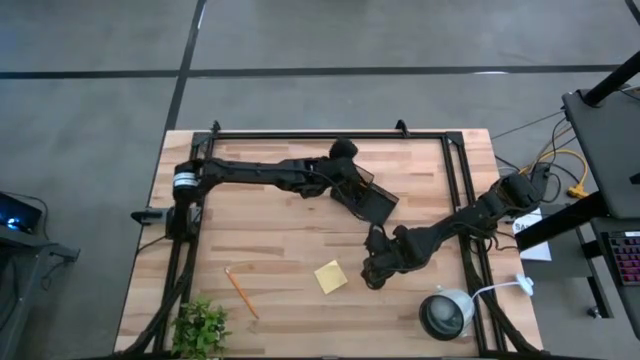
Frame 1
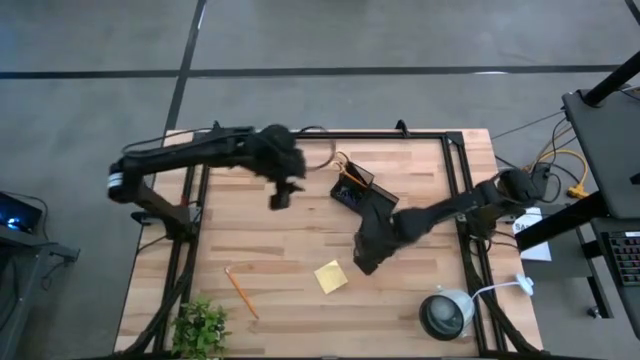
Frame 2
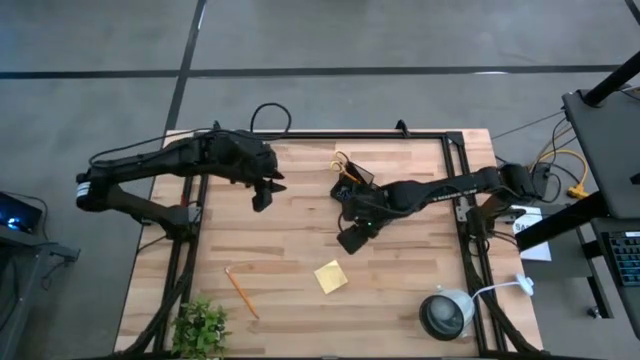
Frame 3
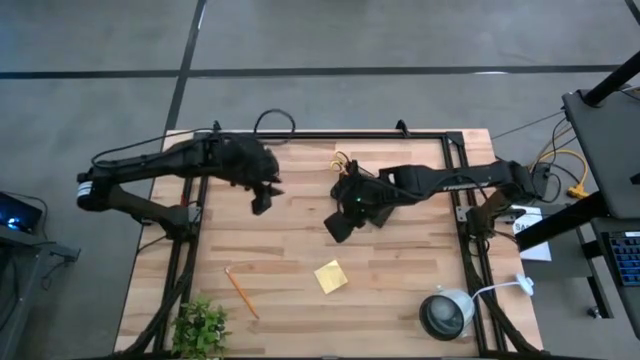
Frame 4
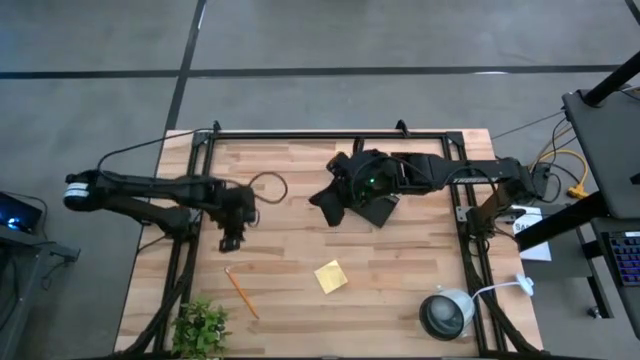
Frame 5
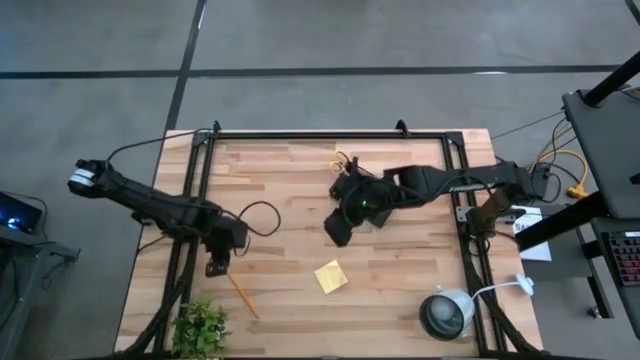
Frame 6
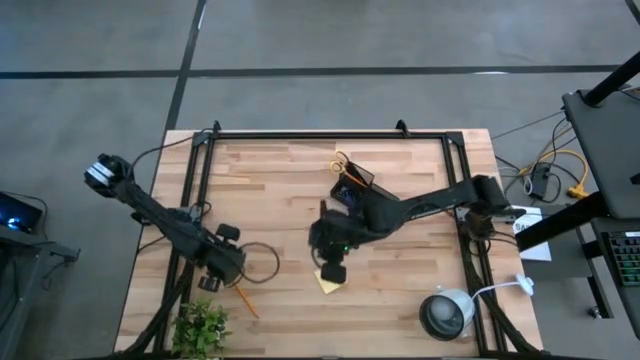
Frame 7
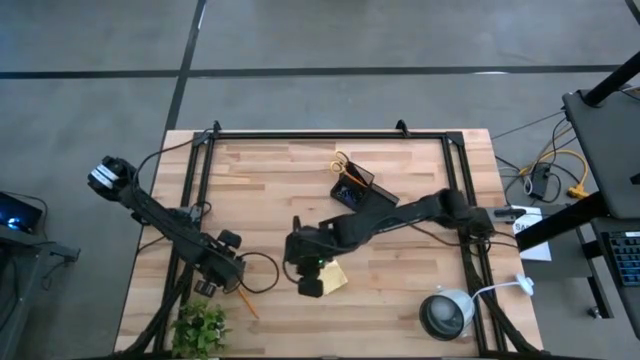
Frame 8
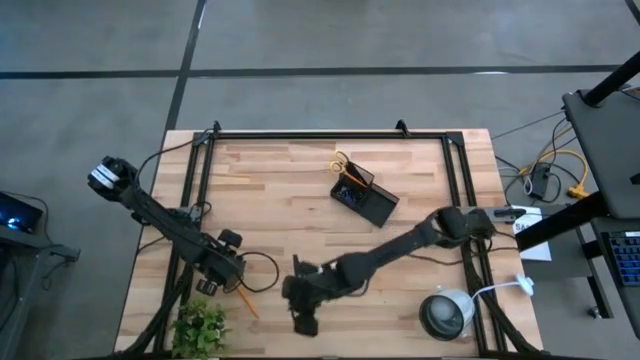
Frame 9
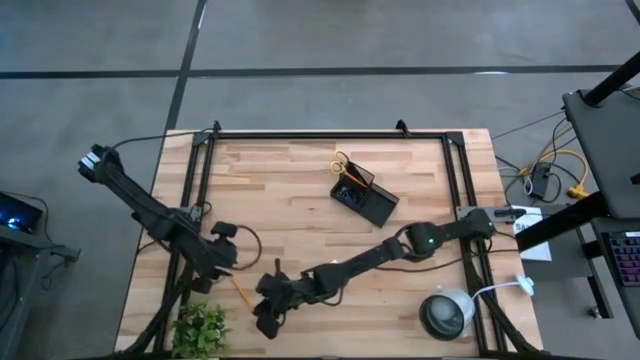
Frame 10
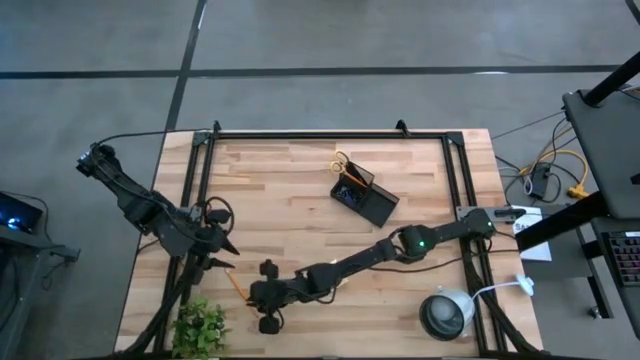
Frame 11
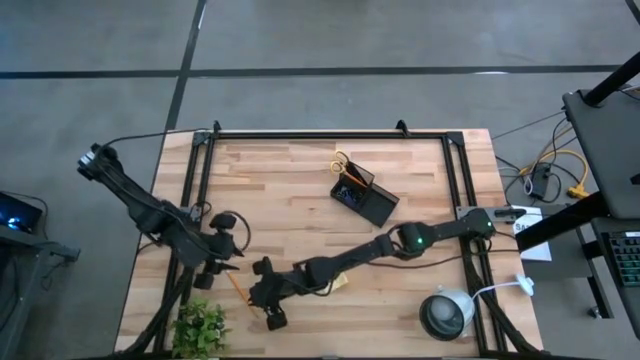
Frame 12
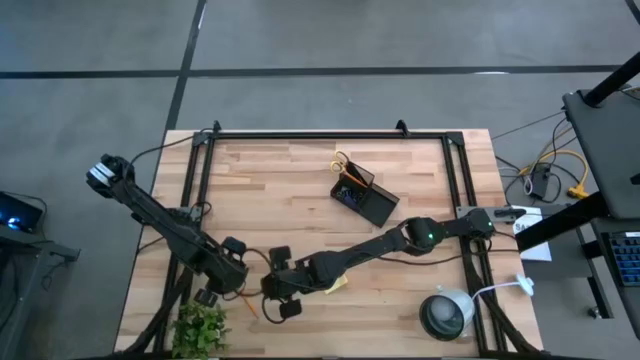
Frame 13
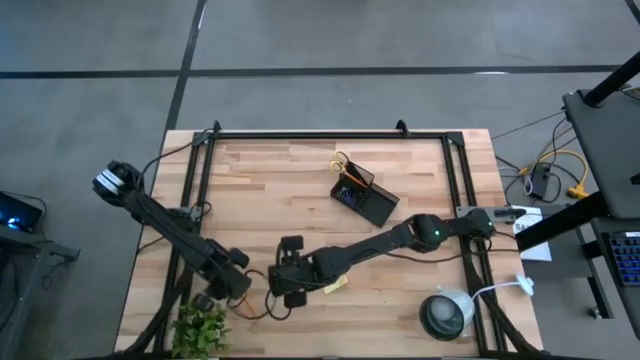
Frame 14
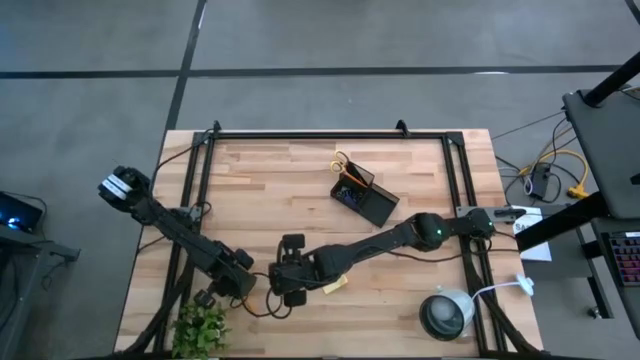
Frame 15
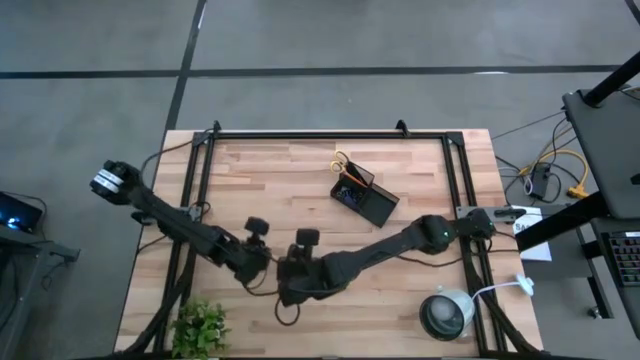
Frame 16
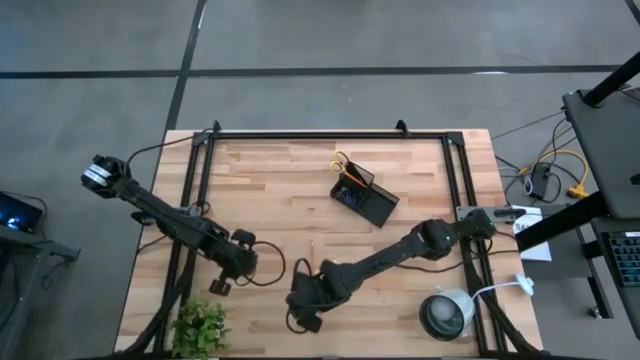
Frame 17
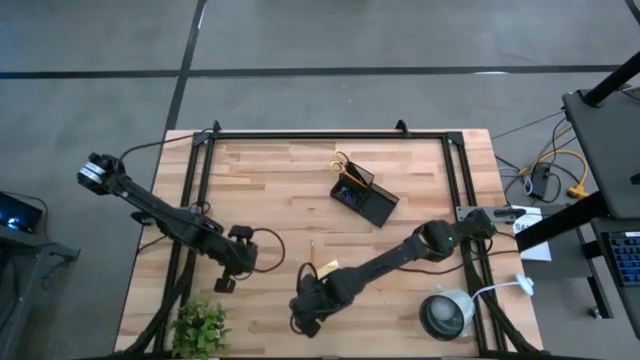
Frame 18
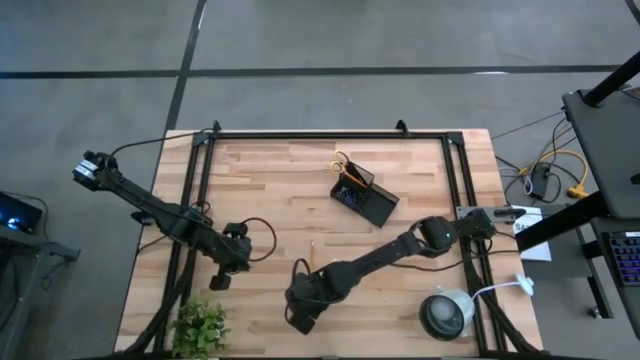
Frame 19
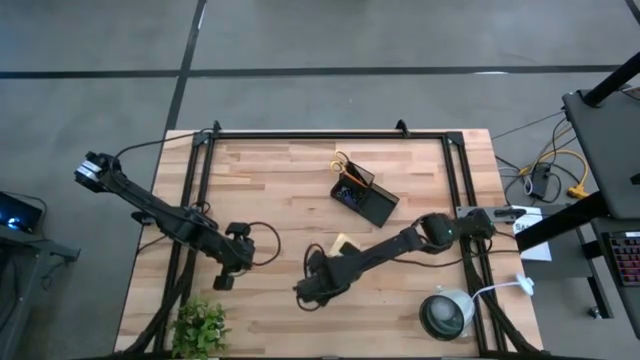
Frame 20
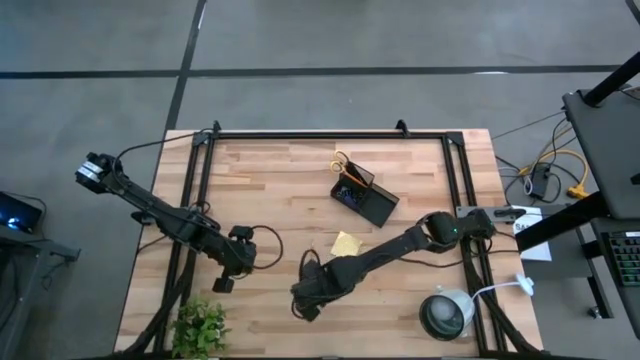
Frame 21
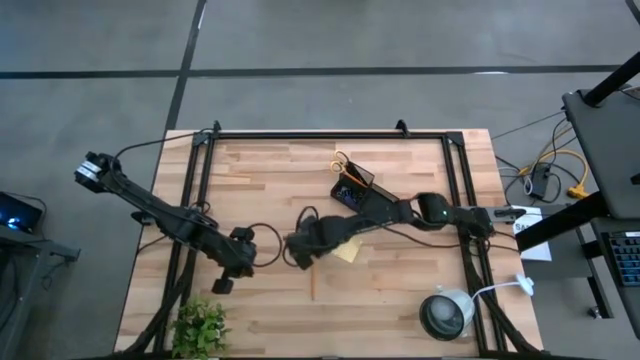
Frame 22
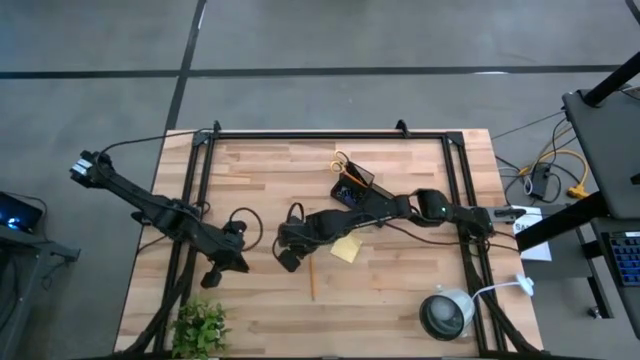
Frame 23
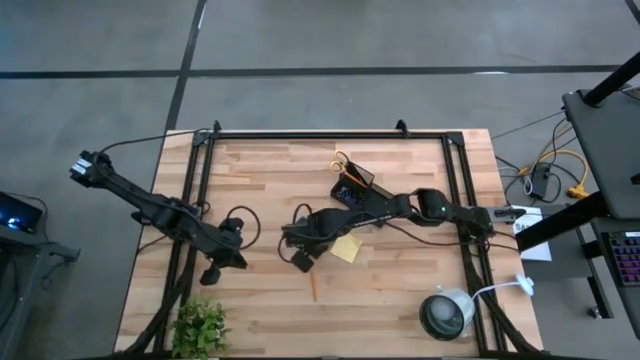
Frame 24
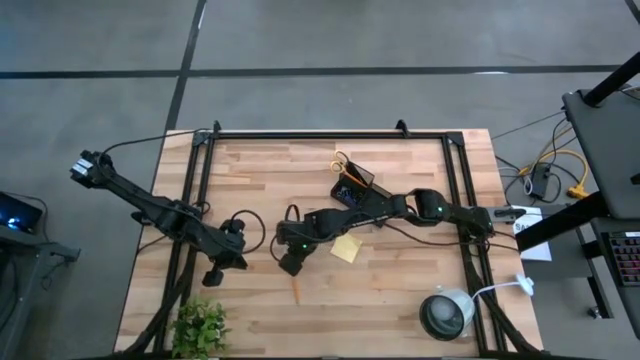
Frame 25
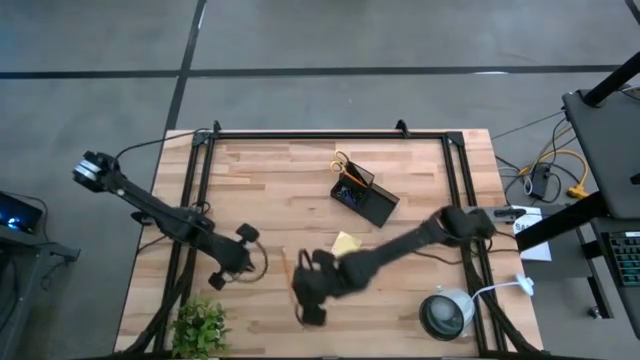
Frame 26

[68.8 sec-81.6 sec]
Task: Pick and place office supplies into organizer
Put the yellow pencil into the black desk organizer

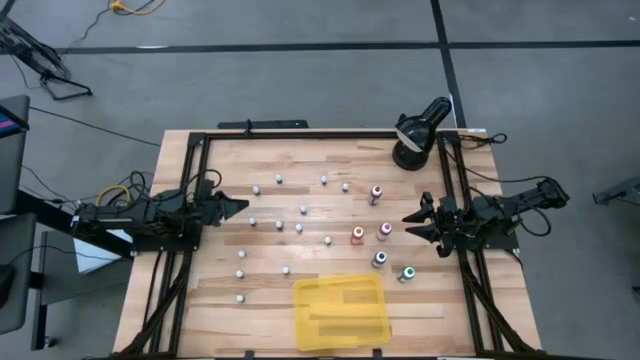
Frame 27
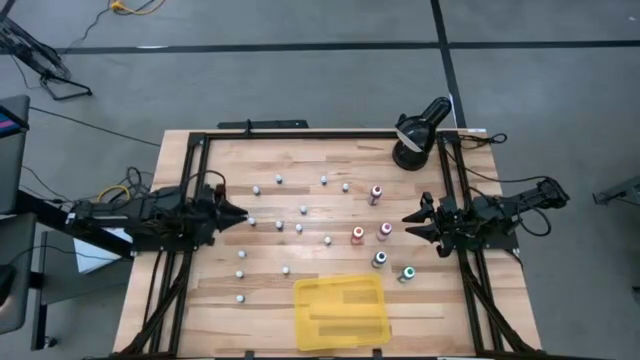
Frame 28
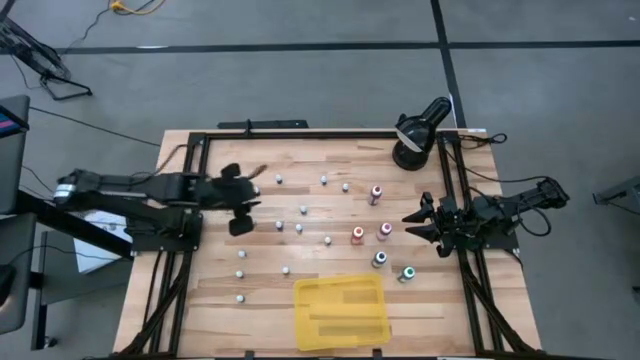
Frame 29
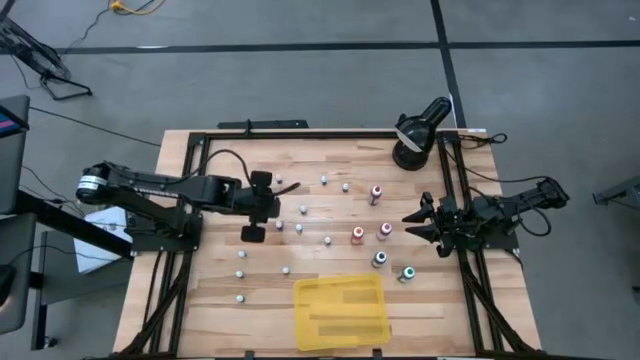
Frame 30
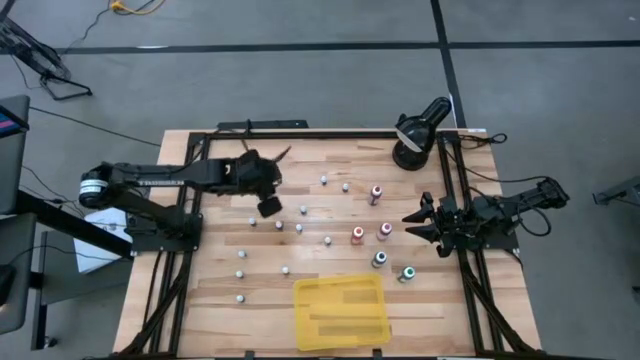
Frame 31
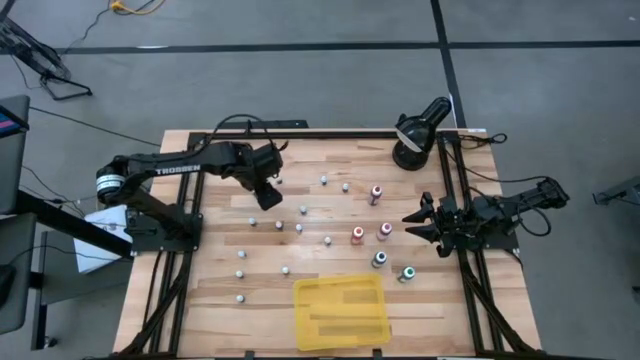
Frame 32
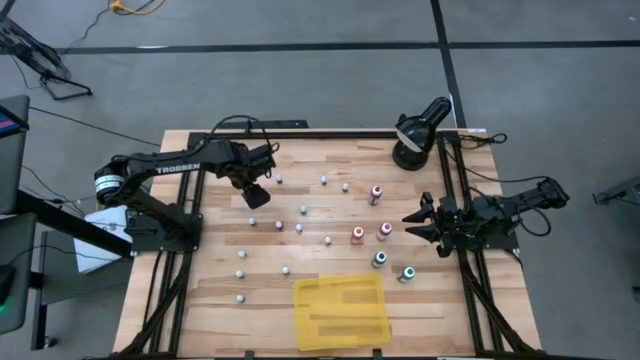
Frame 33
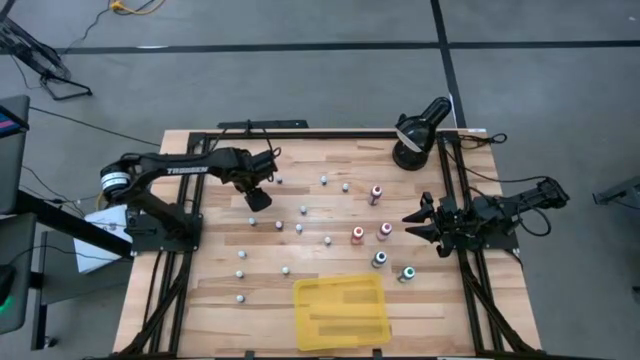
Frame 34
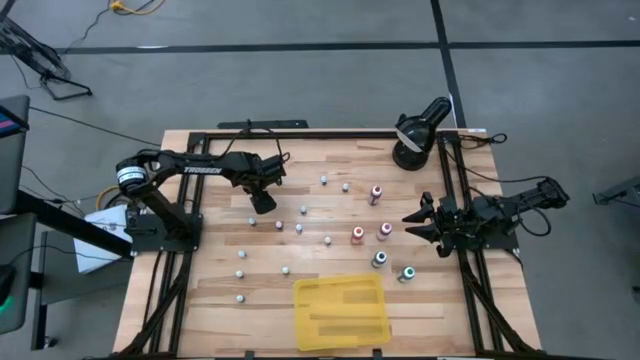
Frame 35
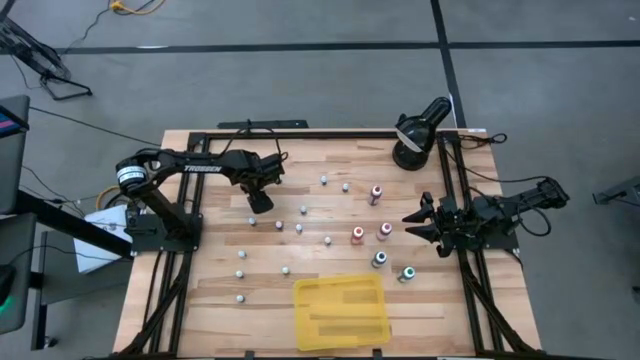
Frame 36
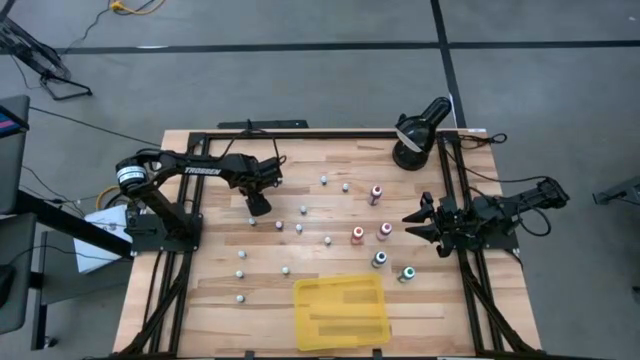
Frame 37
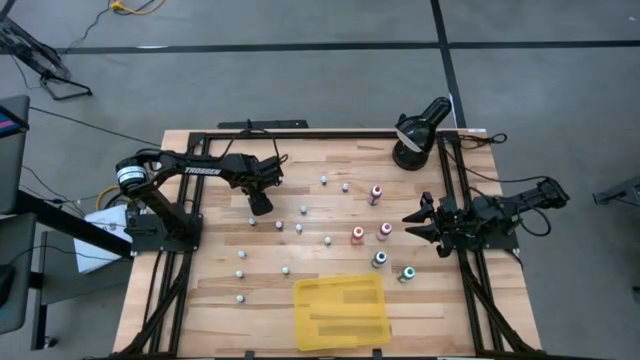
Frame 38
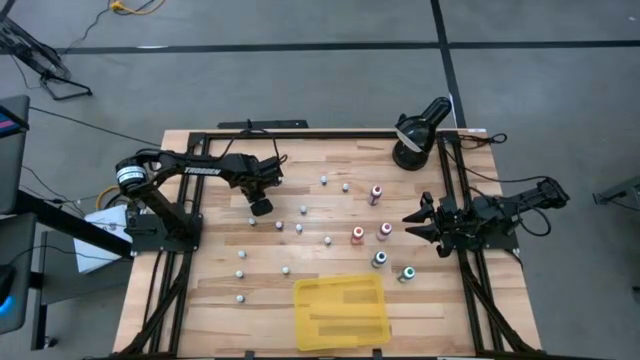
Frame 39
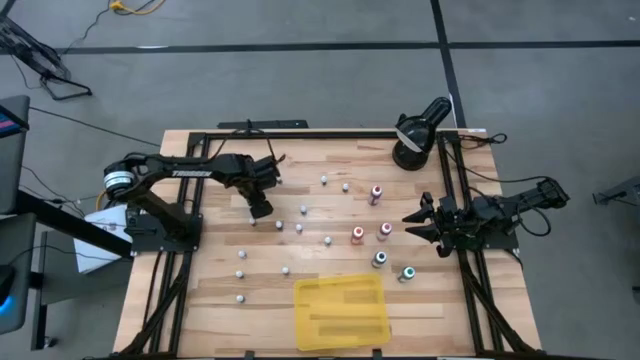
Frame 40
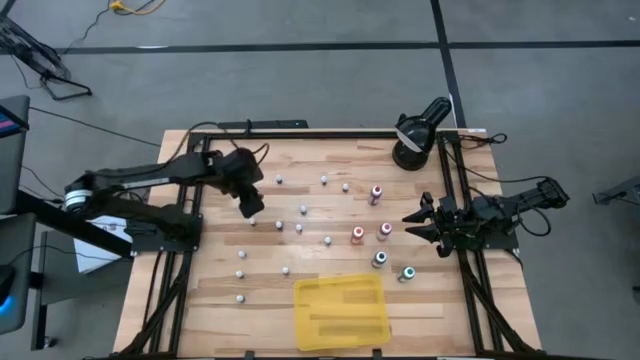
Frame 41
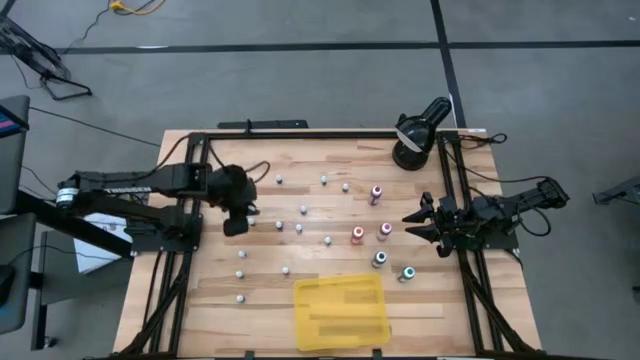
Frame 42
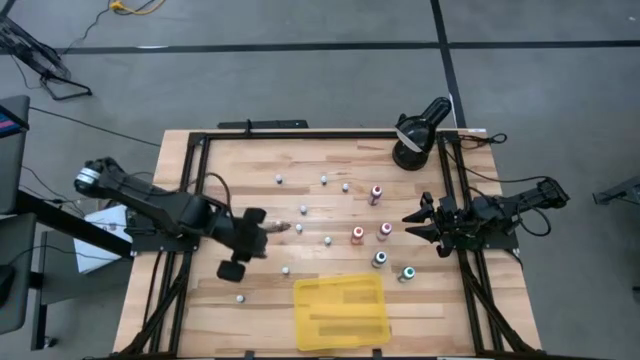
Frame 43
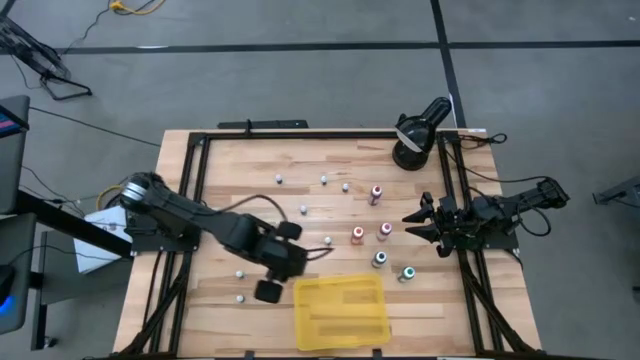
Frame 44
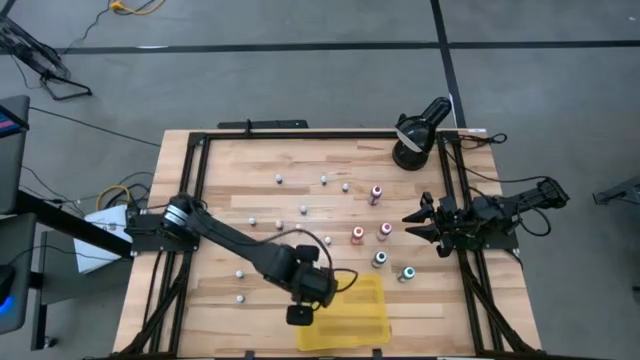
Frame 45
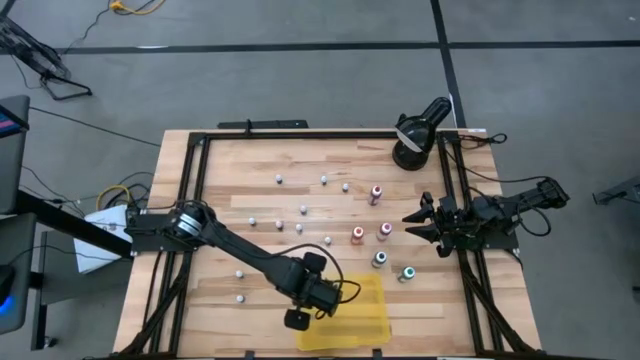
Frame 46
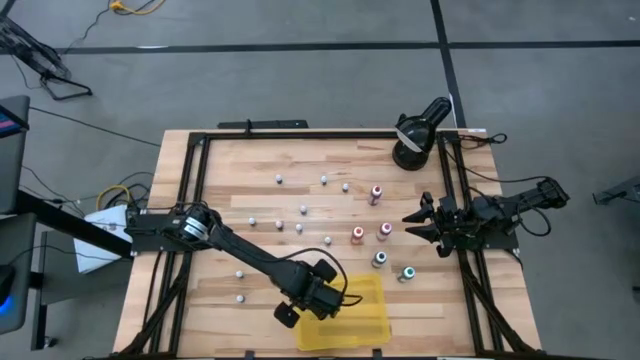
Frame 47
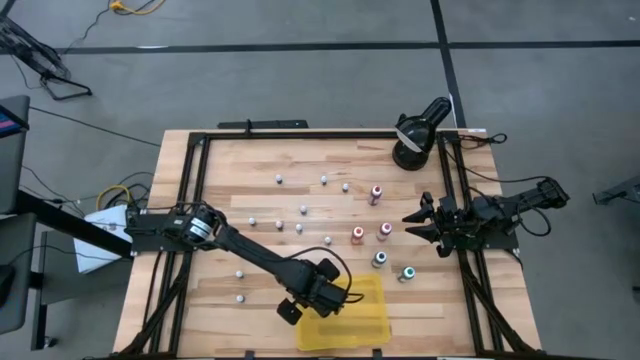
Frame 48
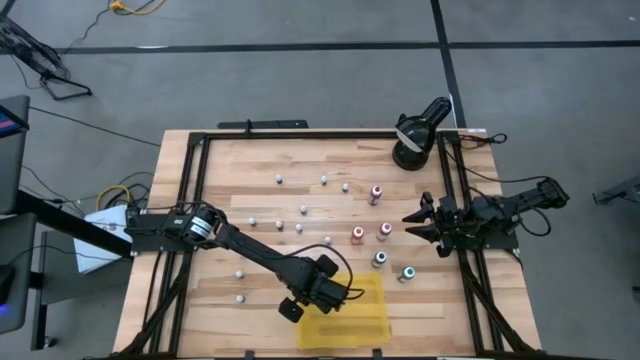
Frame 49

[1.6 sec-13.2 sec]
Task: Pick & Place food coloring
Put the small brown food coloring bottle in the yellow bin
